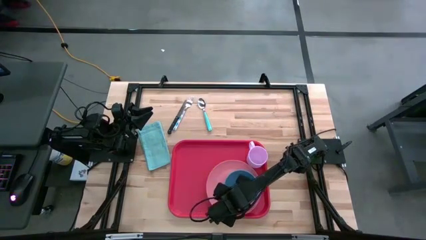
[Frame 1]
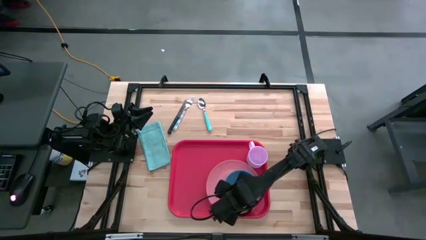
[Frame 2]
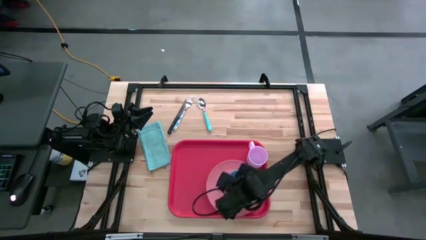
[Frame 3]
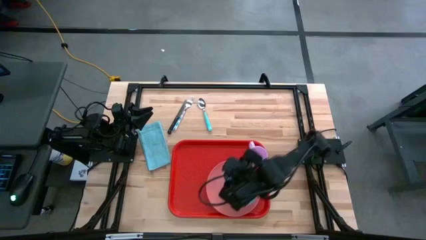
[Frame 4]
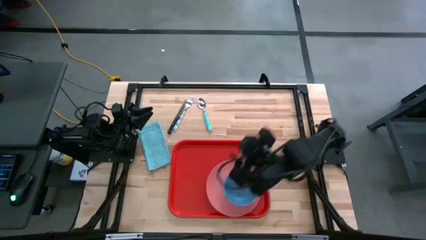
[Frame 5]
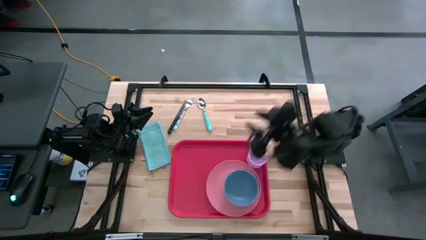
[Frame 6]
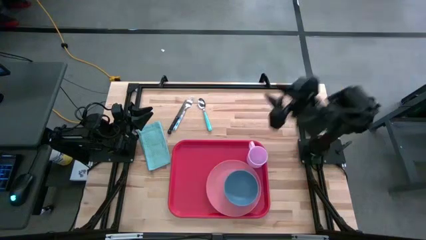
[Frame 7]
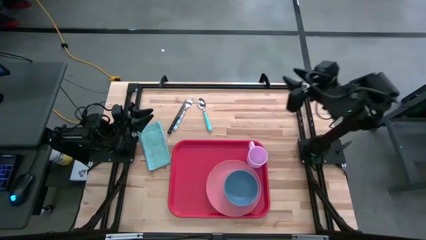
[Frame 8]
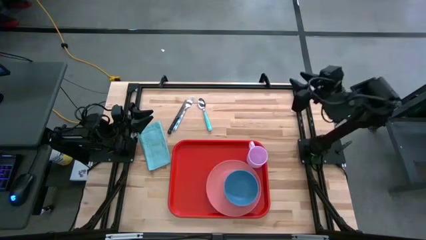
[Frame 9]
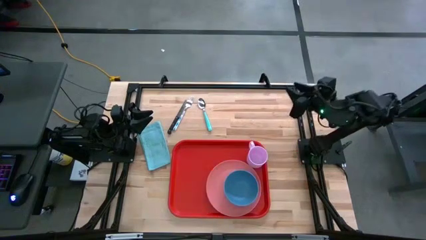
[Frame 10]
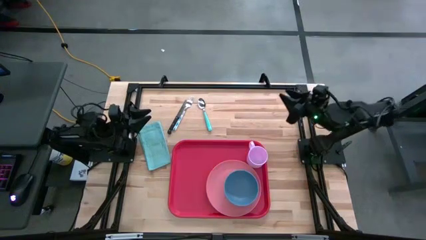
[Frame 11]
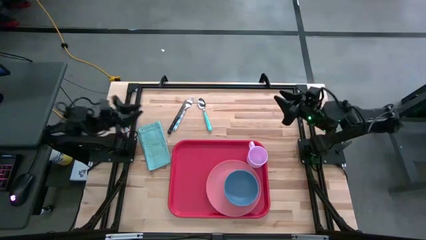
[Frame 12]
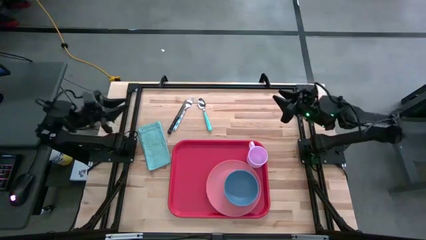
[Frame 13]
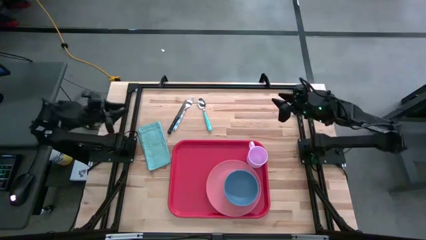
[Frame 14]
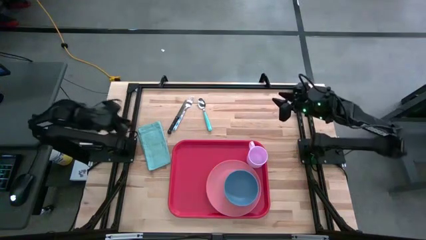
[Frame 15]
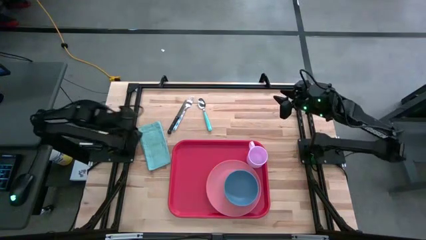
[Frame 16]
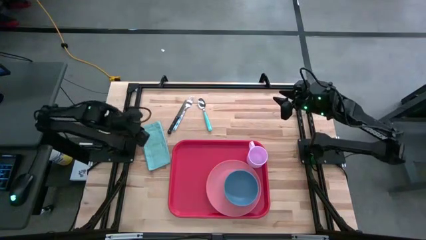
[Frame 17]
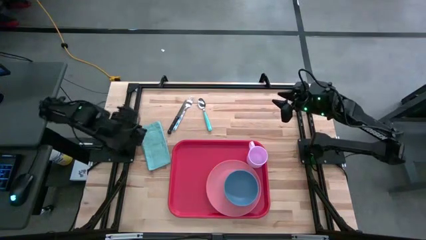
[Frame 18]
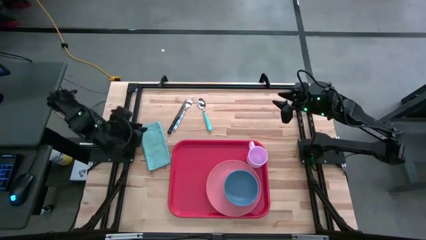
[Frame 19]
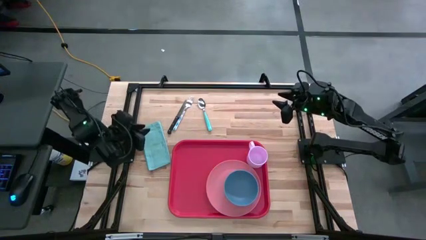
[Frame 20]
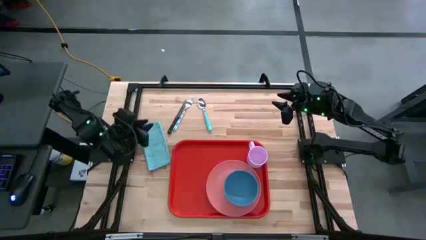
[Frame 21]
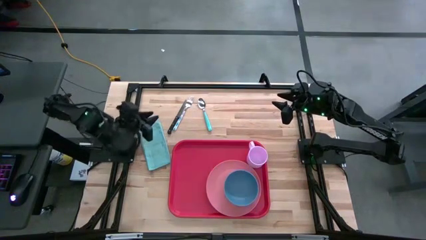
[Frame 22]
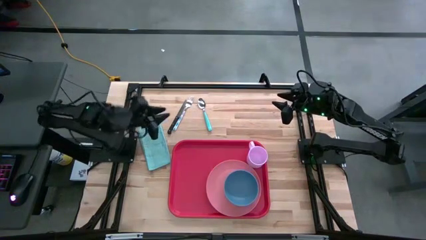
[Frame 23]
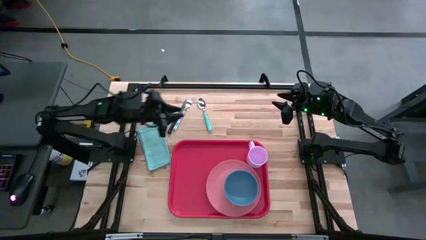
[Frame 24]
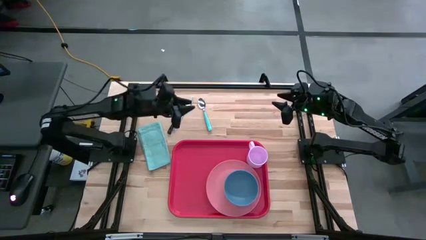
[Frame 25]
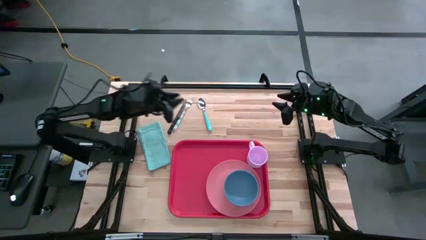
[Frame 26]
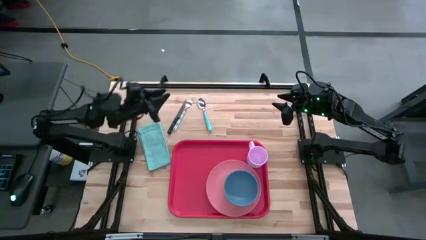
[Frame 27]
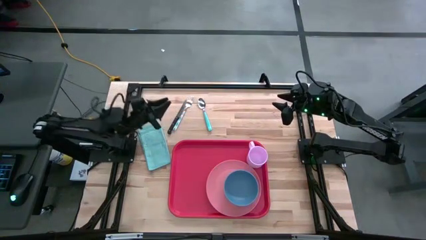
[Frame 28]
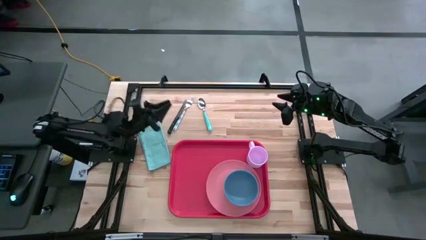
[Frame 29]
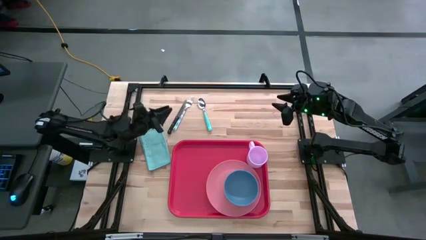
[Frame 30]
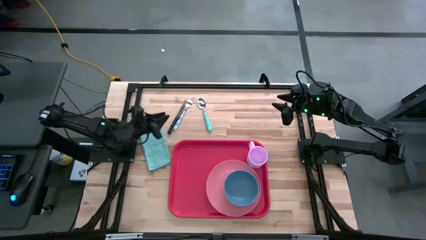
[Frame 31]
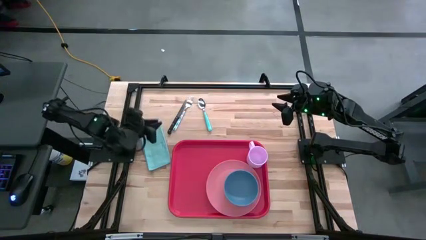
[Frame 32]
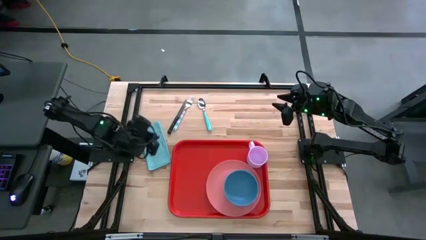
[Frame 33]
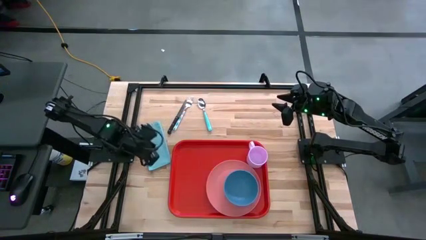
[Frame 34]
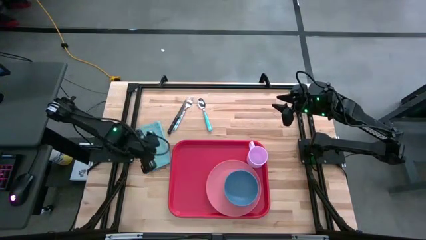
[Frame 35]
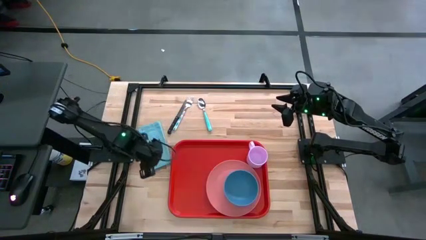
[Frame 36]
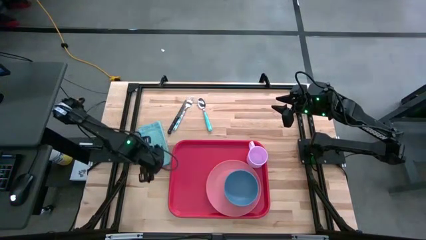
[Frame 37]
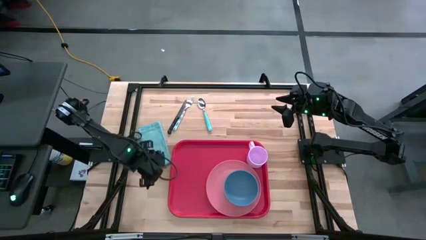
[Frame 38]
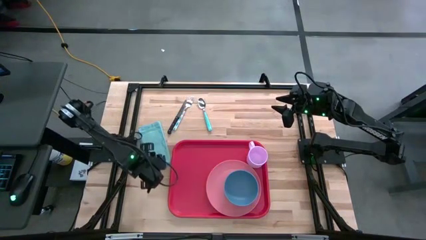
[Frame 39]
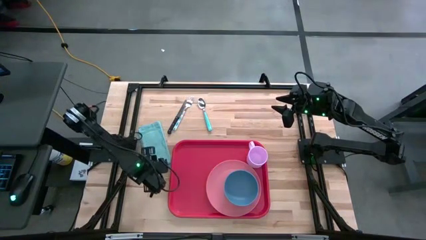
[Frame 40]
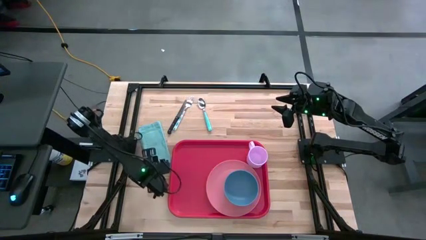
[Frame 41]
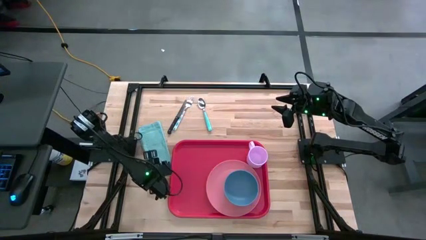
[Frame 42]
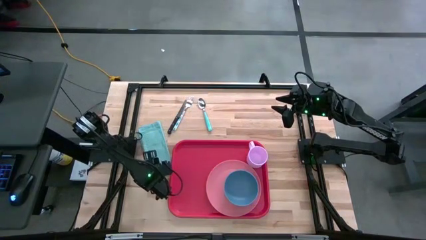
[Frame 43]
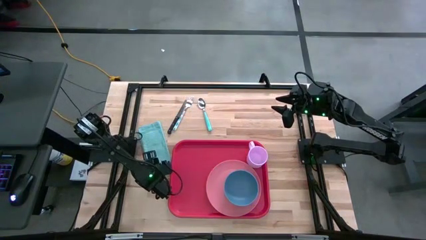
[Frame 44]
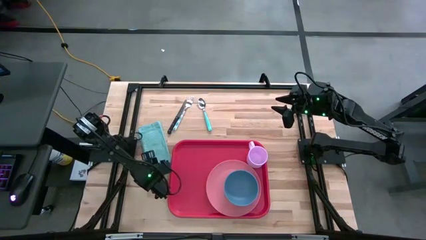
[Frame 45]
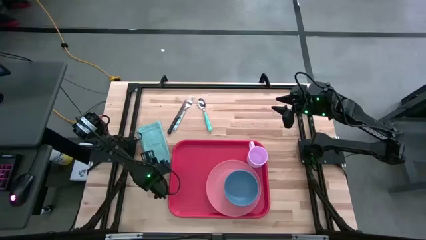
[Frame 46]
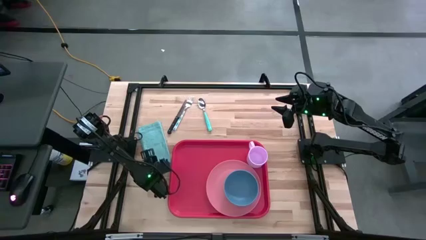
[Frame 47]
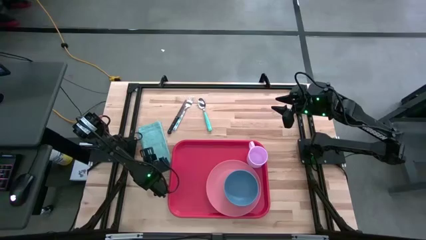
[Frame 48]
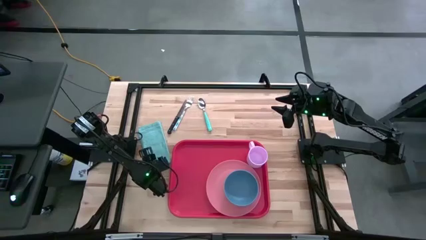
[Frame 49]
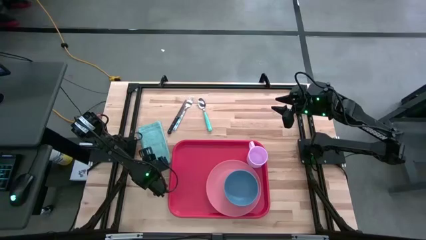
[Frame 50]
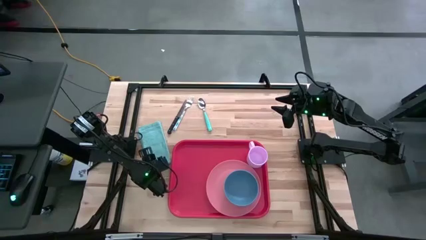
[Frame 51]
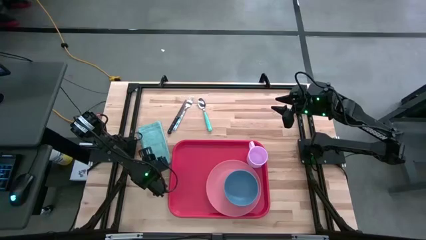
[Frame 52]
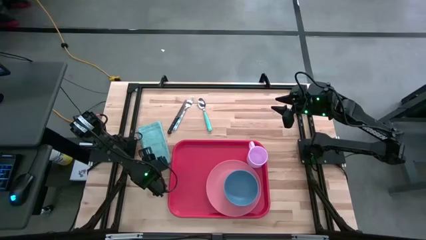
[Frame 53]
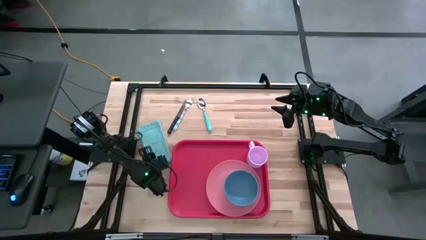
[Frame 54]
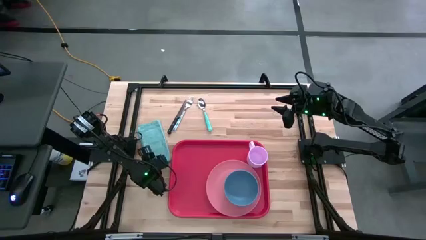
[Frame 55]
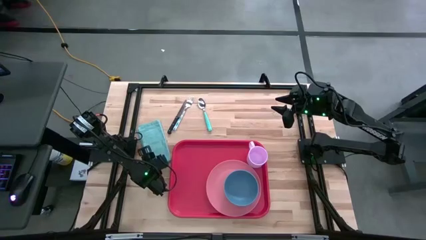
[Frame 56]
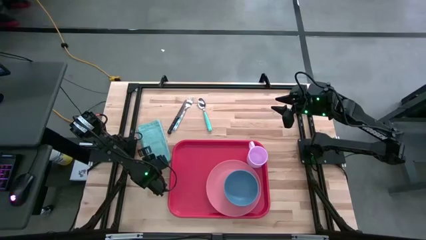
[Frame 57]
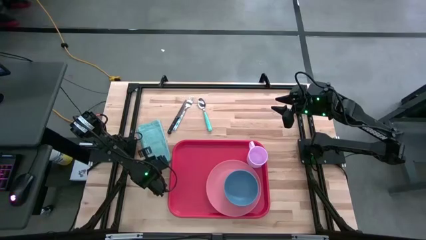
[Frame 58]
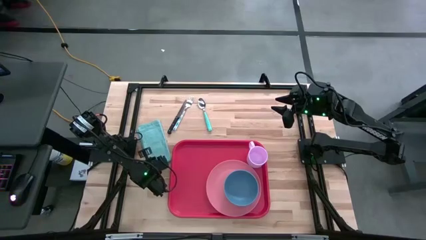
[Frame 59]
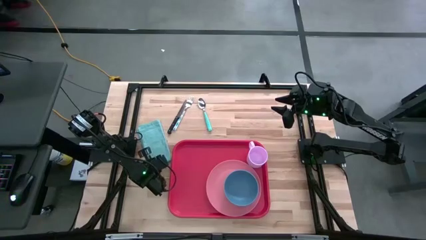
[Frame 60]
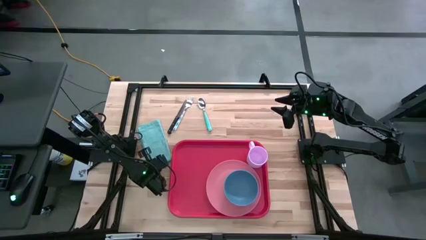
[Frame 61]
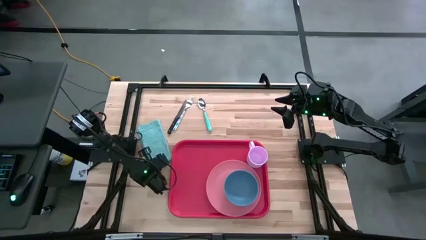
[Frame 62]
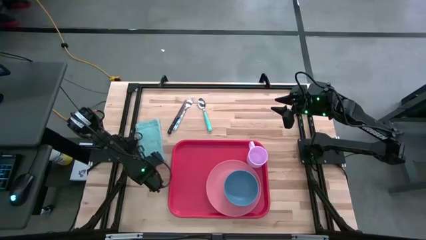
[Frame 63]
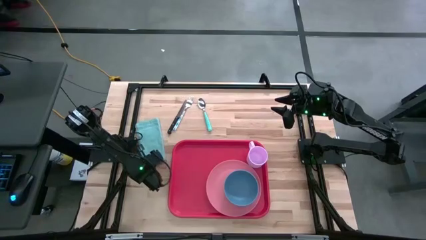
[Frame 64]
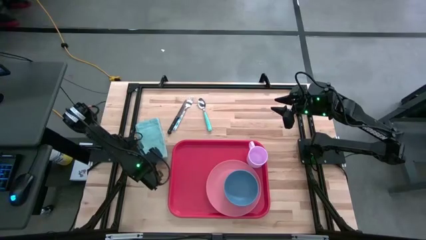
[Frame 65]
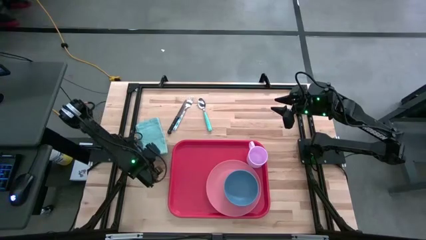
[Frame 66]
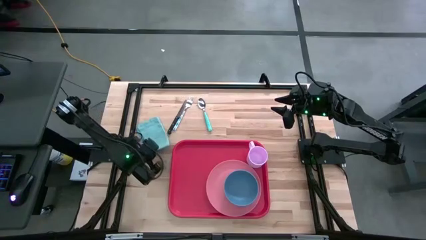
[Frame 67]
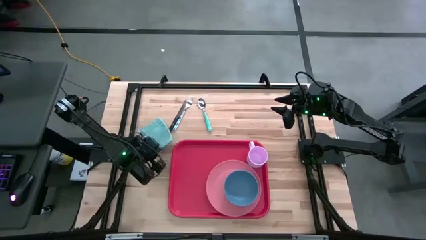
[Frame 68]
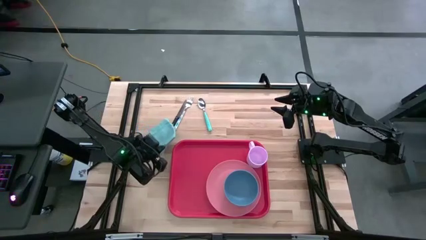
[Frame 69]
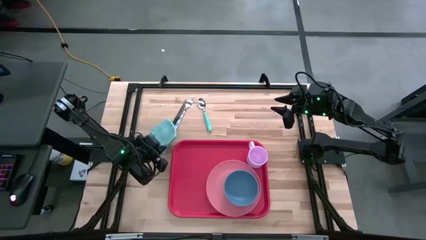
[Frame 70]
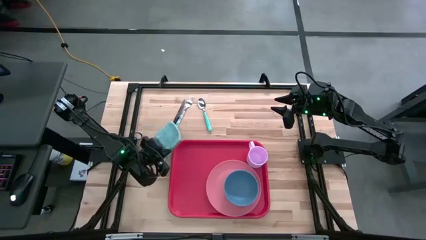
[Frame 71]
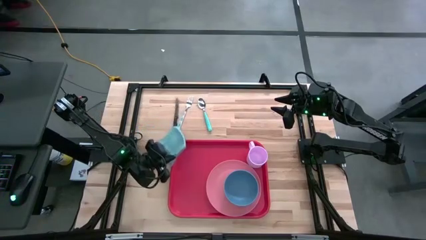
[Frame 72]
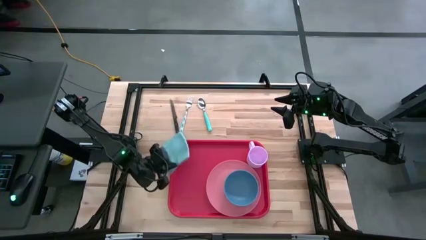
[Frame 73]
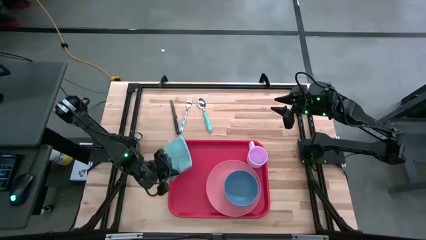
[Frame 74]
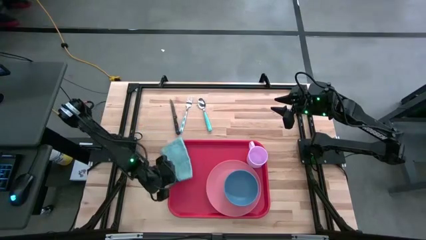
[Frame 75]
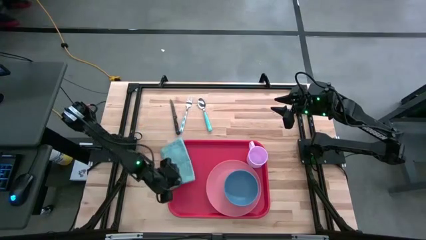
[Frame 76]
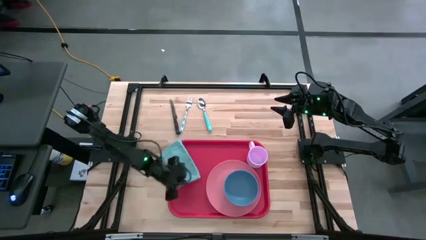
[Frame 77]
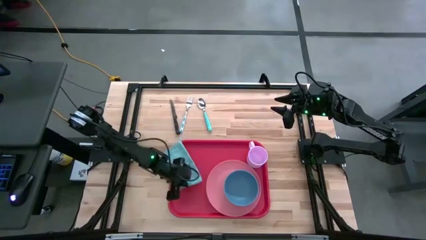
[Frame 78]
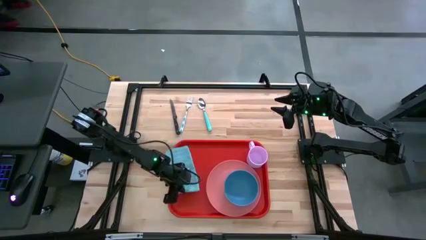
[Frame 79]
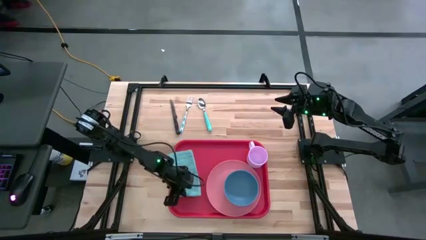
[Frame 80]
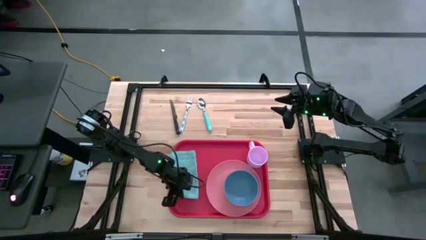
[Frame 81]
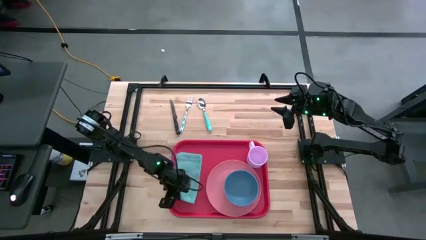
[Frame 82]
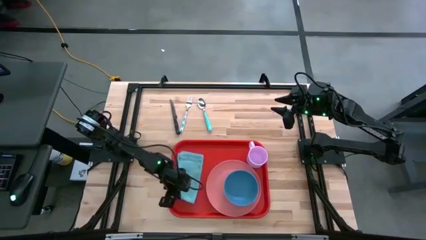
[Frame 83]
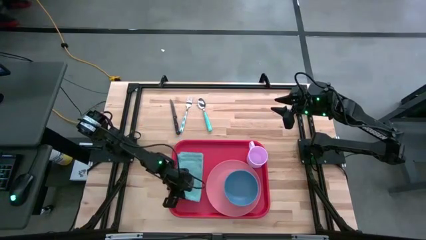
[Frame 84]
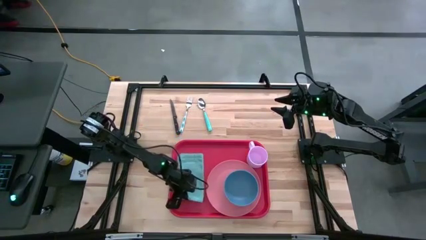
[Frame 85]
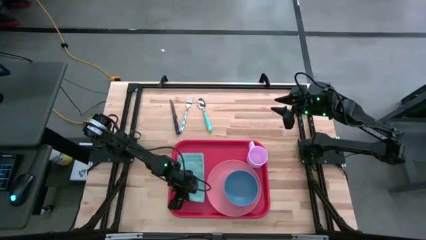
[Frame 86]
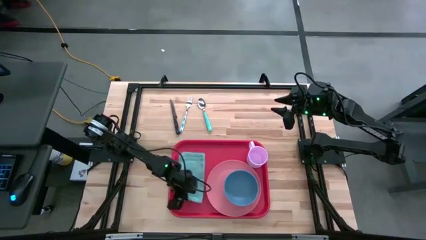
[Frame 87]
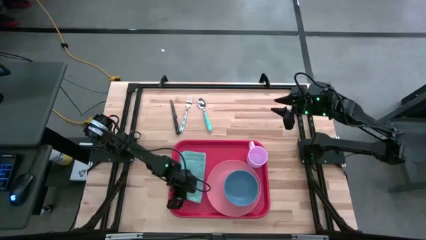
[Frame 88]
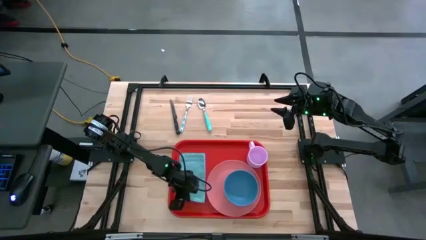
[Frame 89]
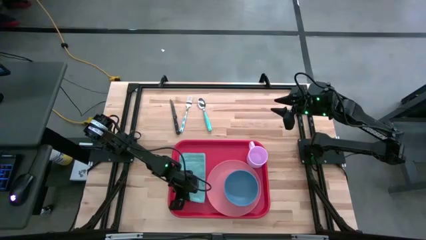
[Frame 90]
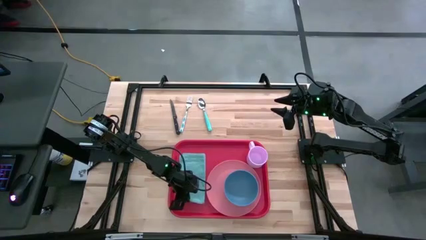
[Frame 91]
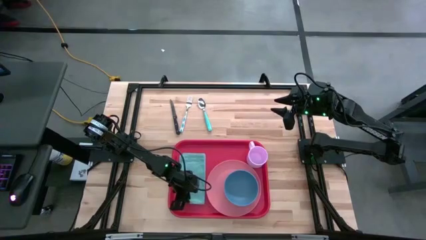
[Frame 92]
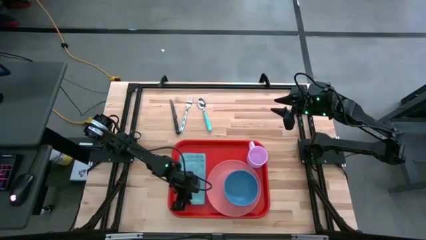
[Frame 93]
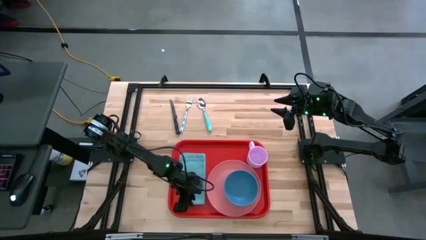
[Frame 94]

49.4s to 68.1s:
Task: Set up tray
Put the blue napkin on the red tray to the left of the pink plate
